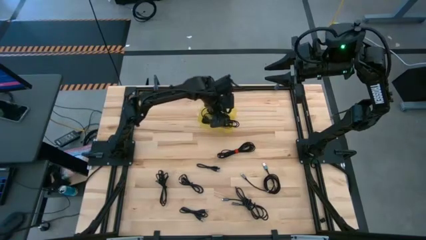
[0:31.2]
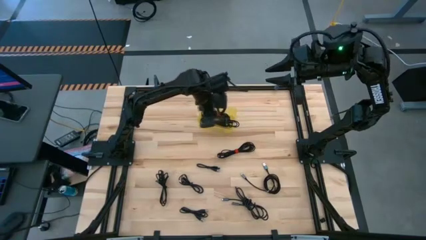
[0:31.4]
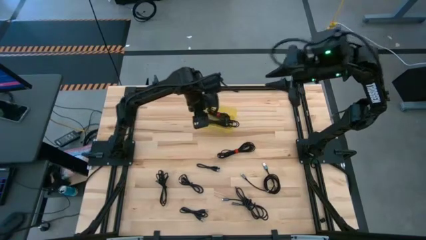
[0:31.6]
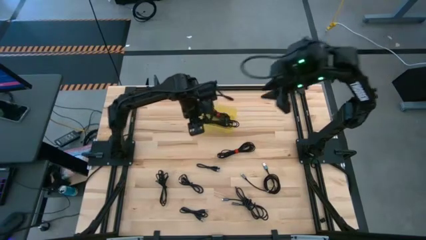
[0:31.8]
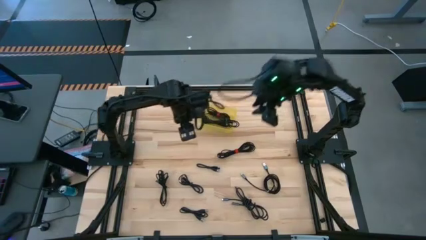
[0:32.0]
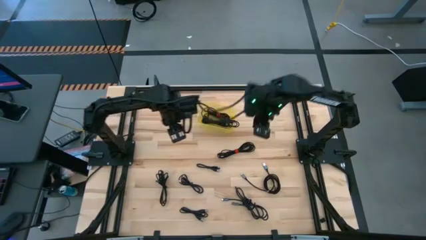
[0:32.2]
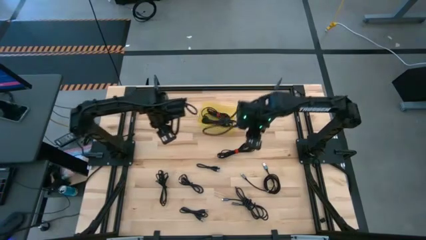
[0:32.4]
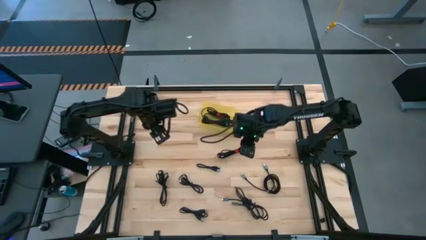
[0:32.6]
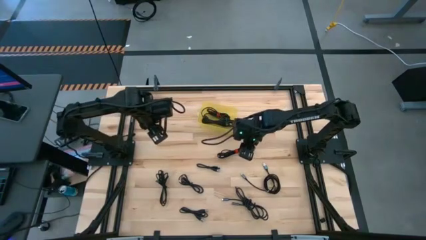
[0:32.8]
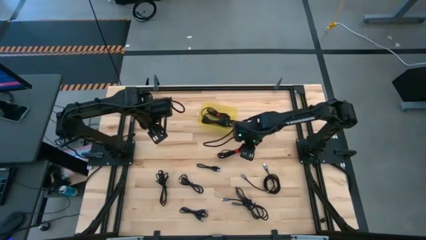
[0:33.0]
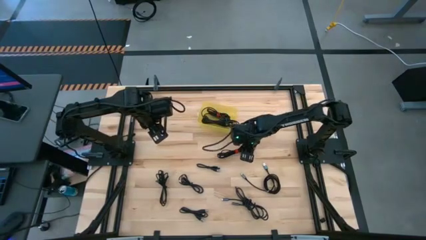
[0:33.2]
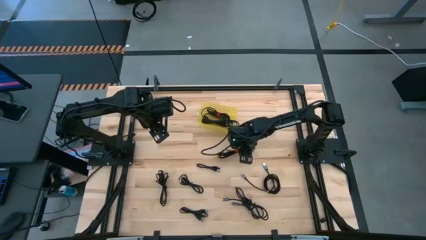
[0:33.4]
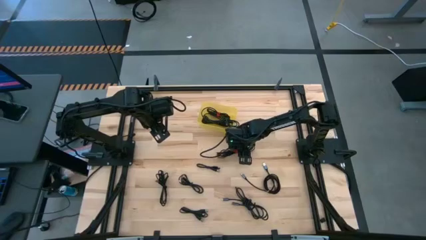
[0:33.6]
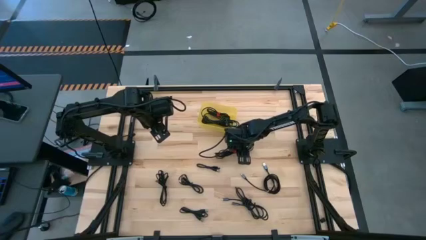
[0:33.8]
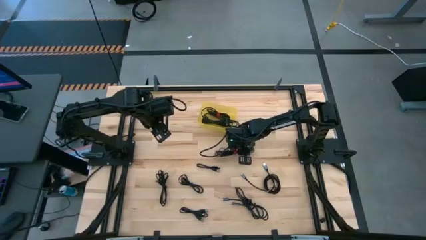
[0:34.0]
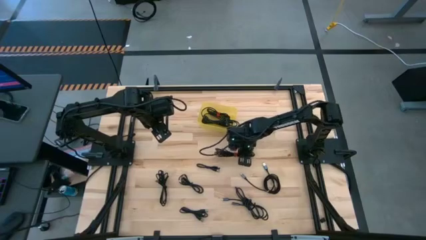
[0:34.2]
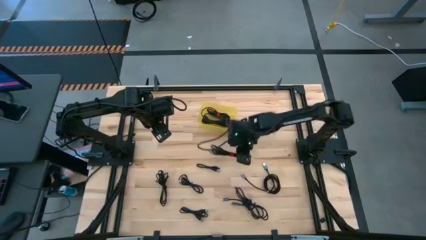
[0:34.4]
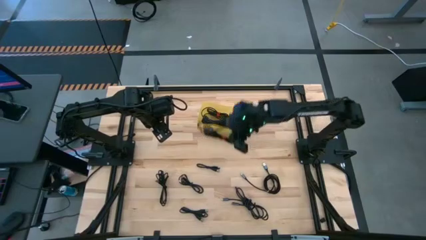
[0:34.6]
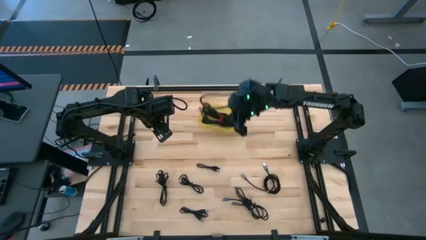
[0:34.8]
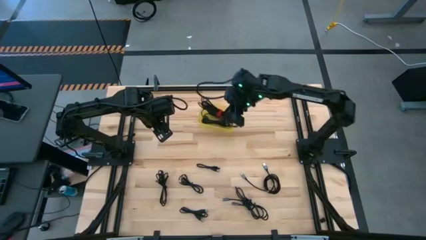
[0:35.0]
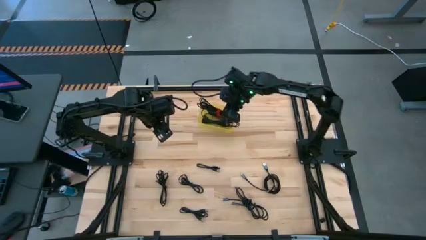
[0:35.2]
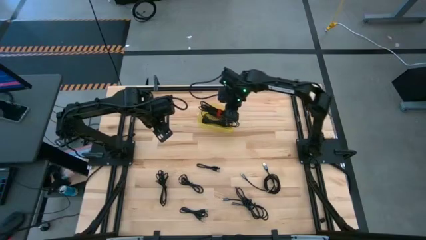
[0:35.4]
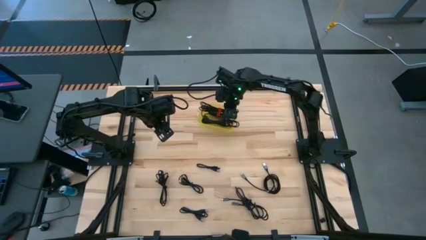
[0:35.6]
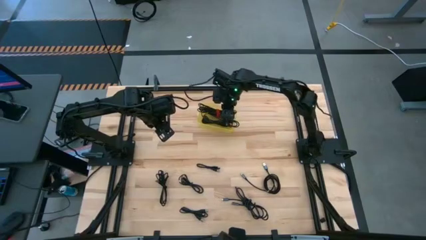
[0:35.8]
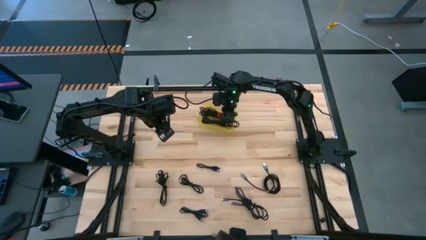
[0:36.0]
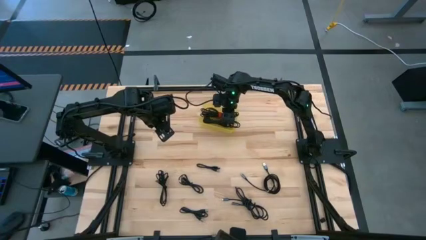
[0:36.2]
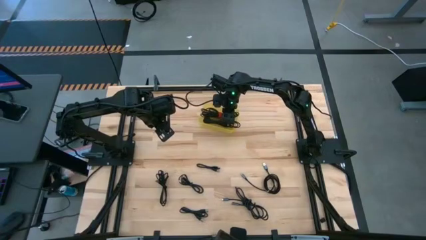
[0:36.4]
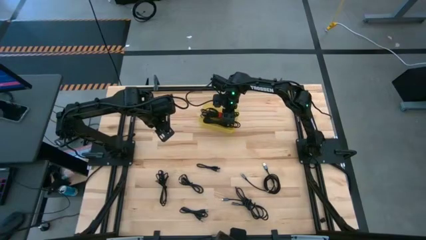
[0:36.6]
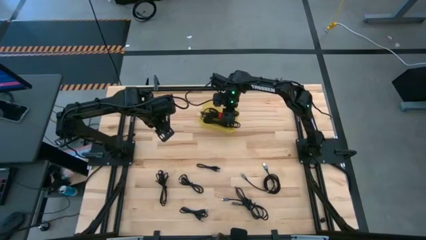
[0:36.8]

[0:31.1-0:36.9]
Task: Pick and place USB-C Cables
Put the black charger cable into the yellow bin

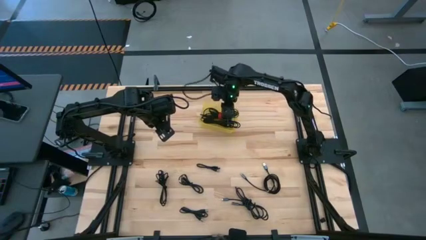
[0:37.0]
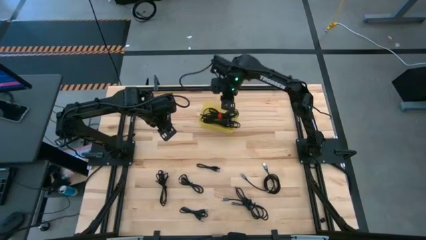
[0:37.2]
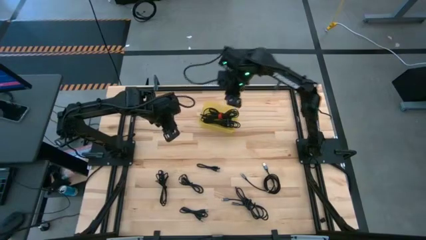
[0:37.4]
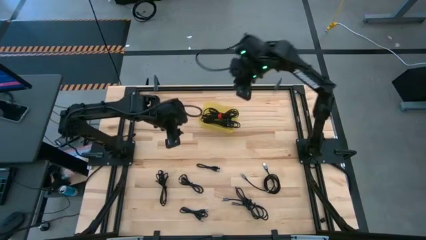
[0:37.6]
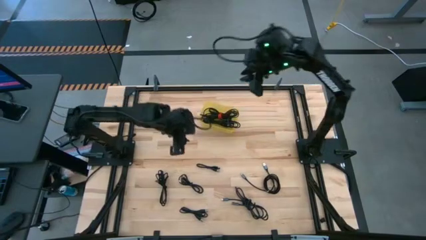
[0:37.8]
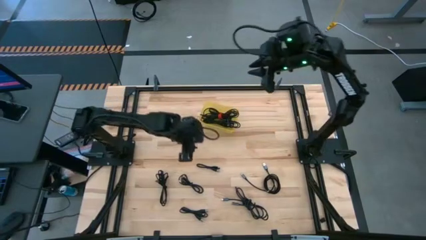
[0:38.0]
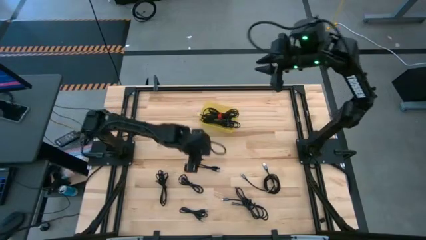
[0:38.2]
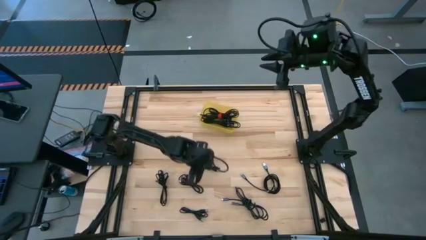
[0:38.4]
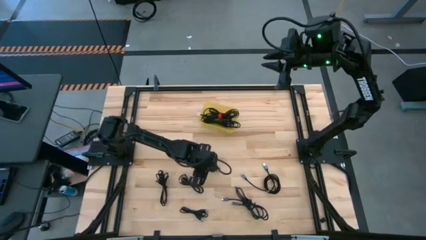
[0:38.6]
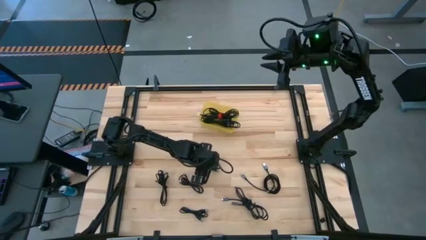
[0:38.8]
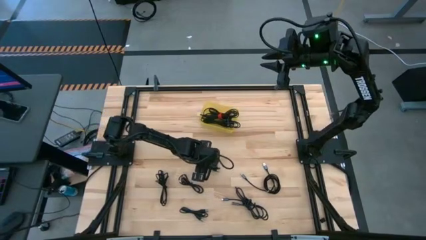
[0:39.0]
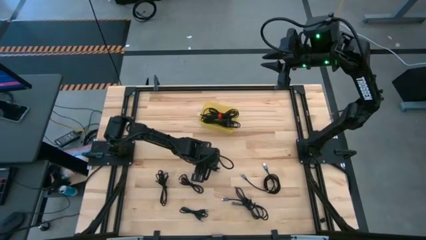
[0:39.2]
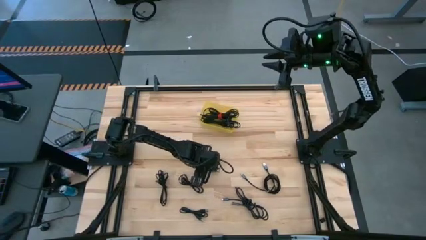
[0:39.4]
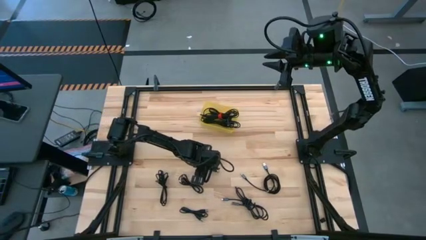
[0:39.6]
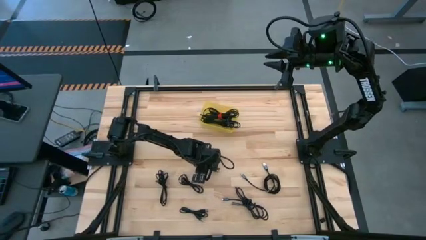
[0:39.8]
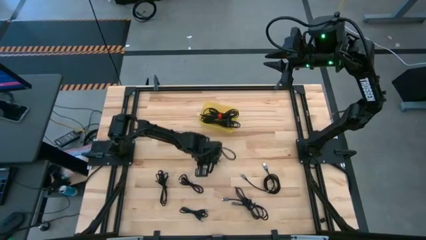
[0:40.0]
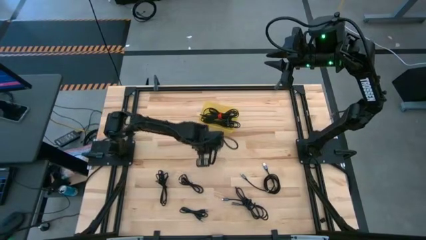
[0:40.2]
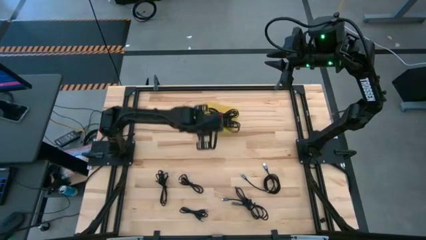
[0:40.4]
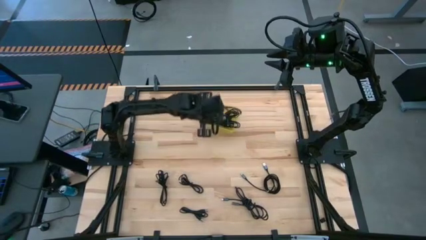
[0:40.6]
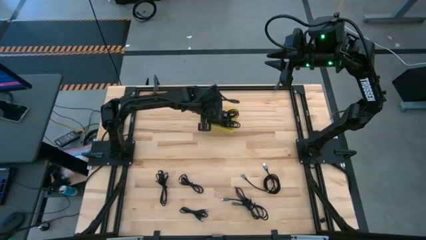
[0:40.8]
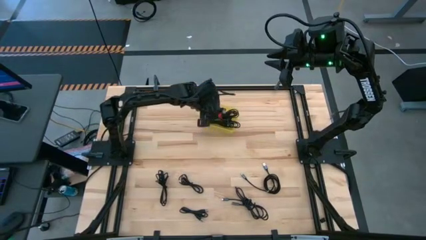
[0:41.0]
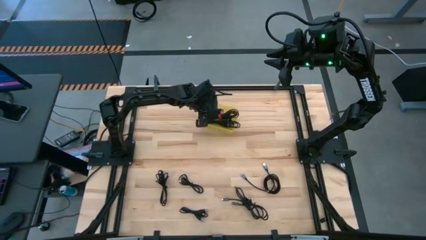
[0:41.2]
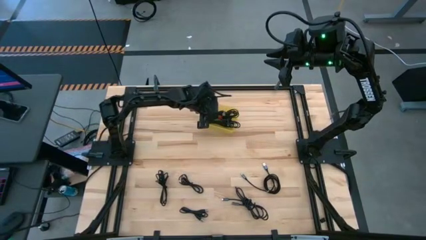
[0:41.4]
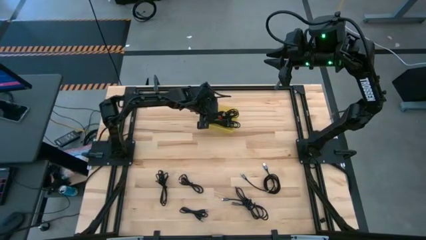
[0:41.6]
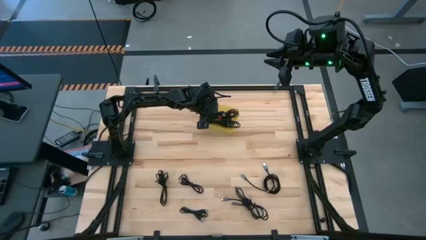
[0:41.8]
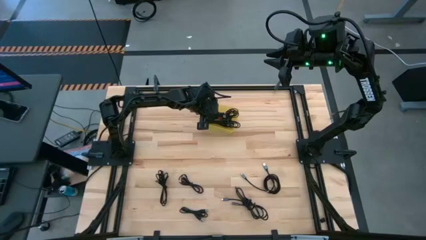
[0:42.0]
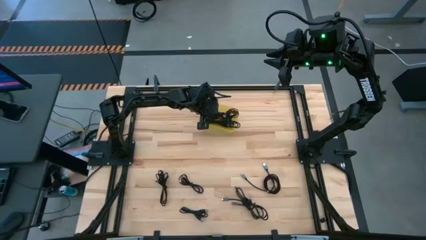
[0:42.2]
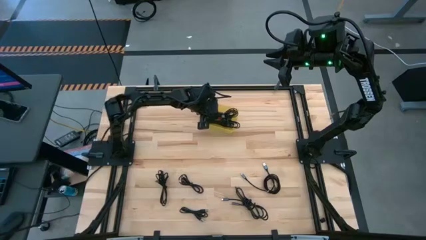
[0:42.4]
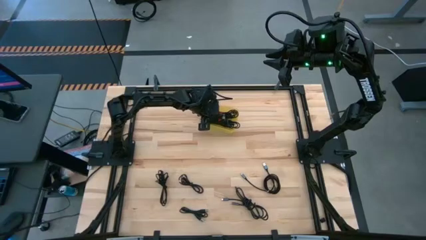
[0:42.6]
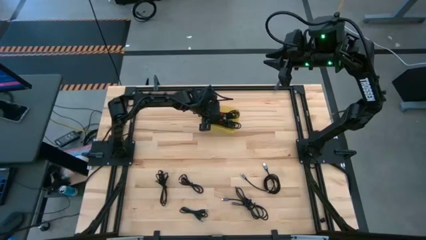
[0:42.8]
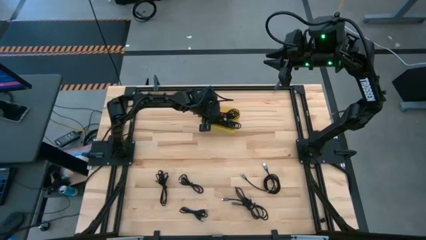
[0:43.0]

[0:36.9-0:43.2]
Put the black charger cable into the yellow bin

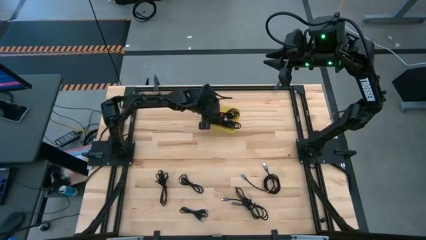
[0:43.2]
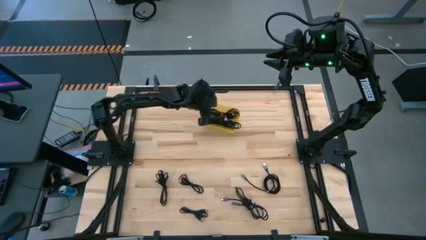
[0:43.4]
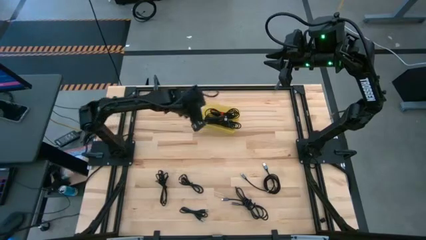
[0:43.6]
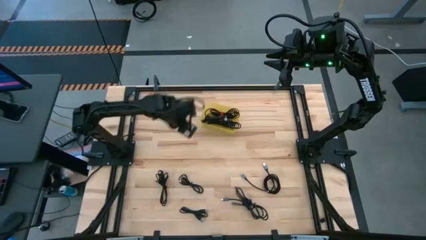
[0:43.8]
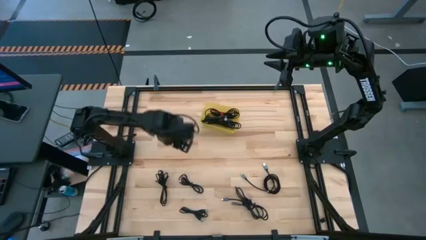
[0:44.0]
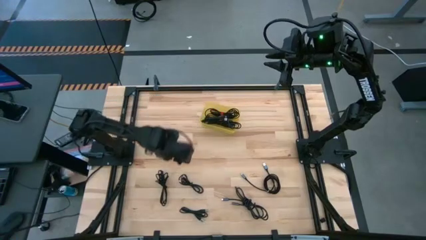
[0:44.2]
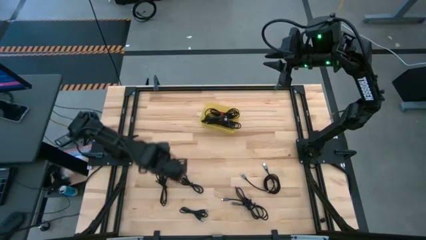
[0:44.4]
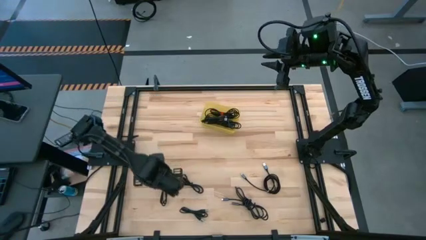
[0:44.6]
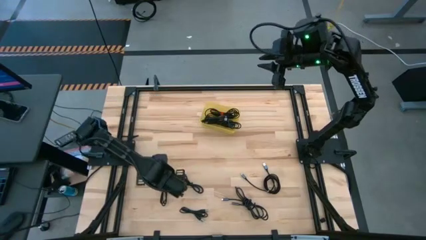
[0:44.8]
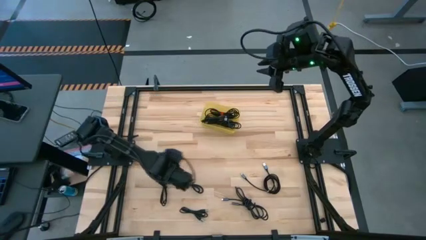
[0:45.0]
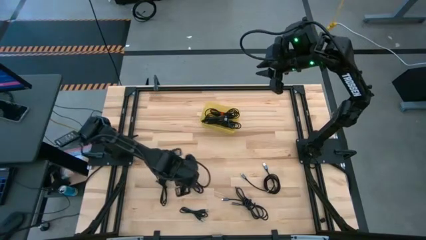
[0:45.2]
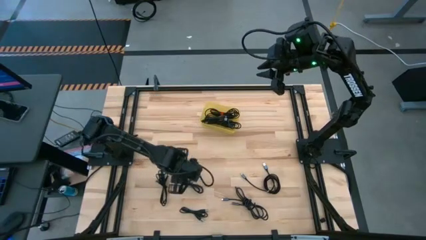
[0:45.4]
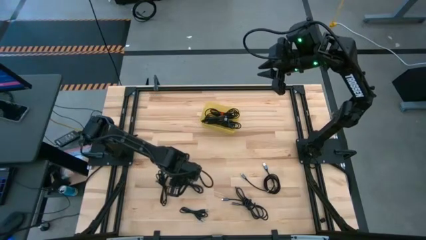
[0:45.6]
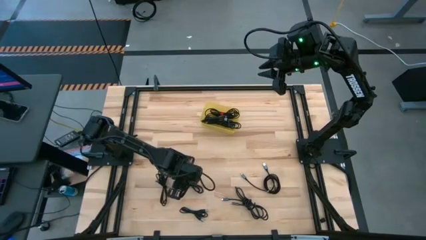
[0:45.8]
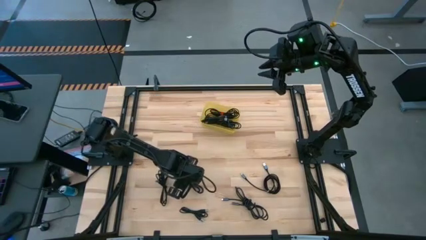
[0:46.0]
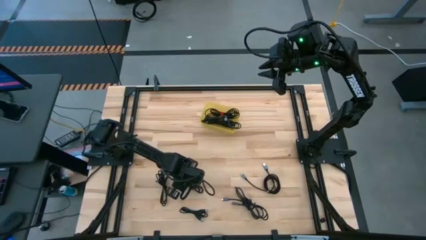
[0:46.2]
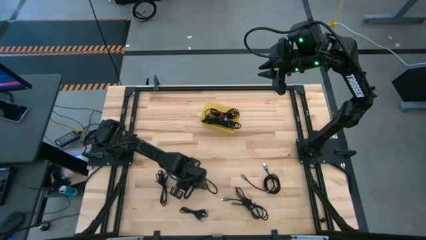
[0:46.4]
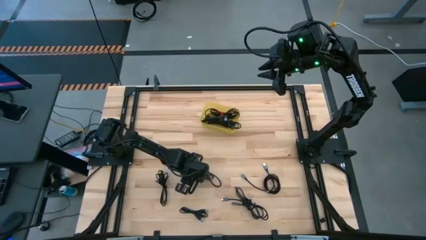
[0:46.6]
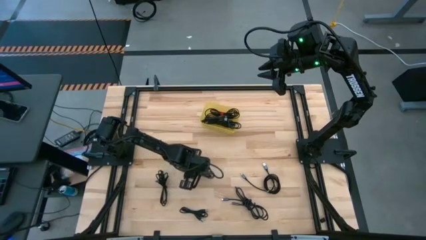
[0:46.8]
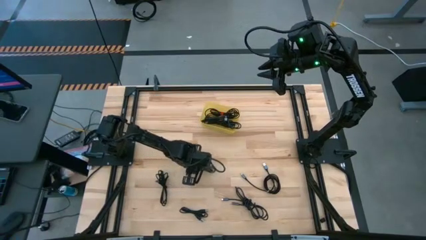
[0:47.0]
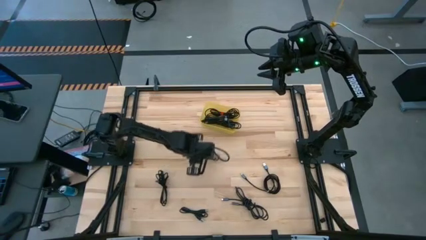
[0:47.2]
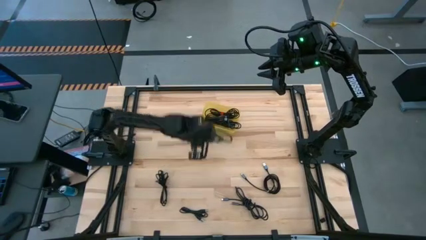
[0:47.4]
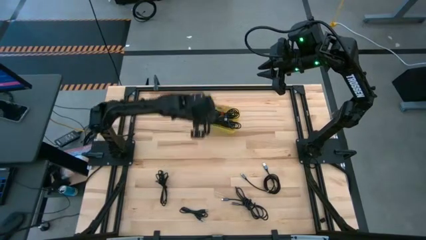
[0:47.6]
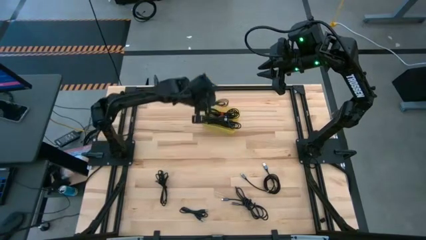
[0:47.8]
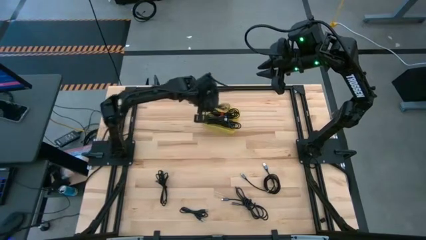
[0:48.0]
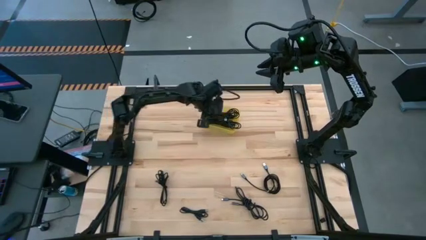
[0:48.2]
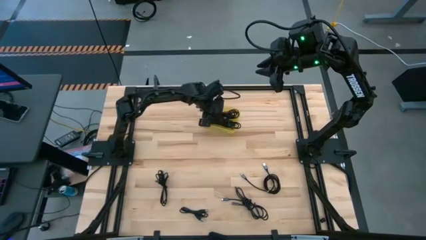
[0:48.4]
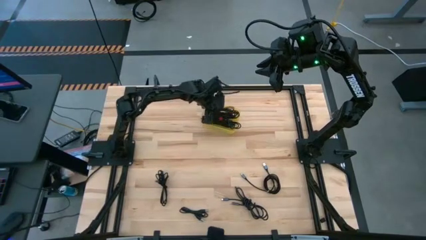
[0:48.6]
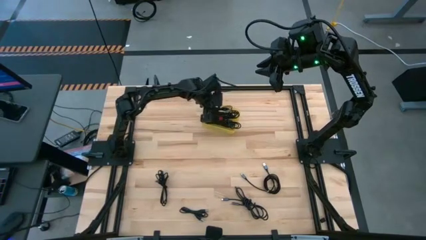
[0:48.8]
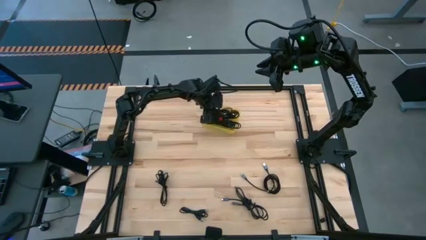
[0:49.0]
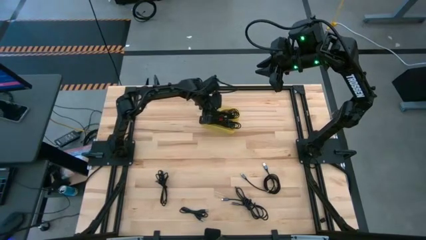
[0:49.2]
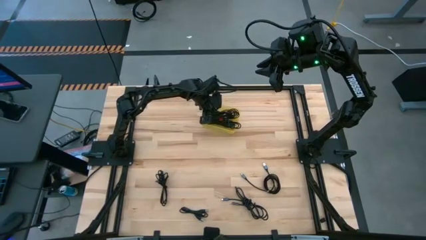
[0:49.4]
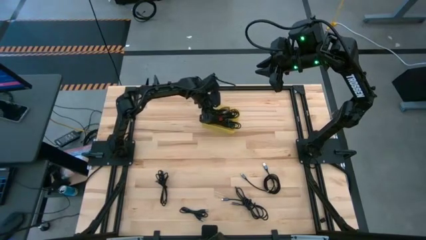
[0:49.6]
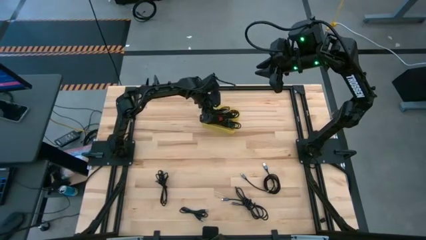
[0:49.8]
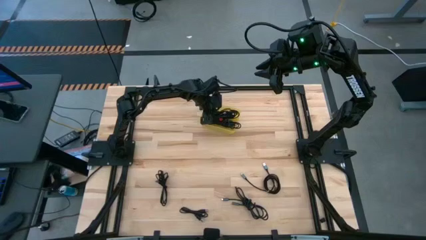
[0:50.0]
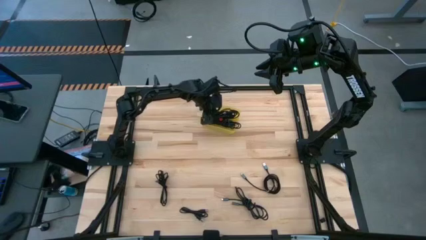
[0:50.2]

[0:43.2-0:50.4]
Put the black charger cable into the yellow bin
